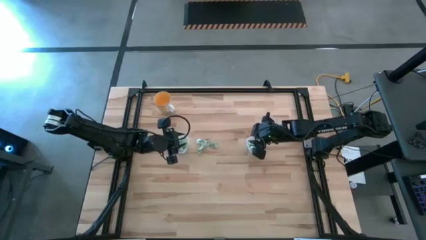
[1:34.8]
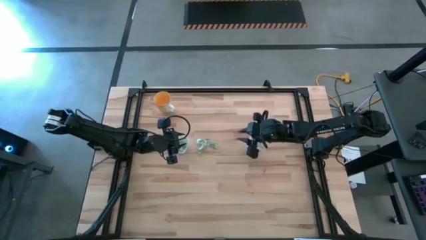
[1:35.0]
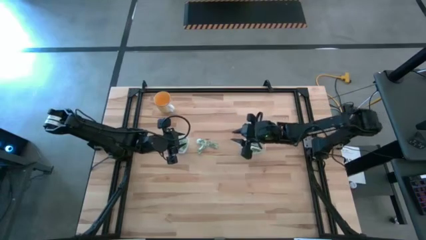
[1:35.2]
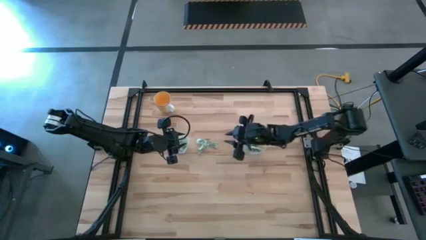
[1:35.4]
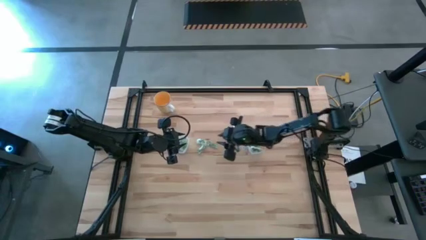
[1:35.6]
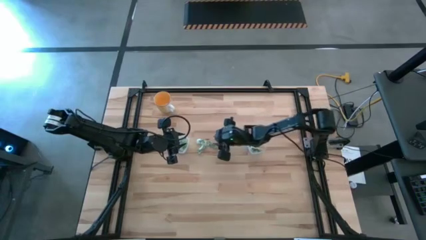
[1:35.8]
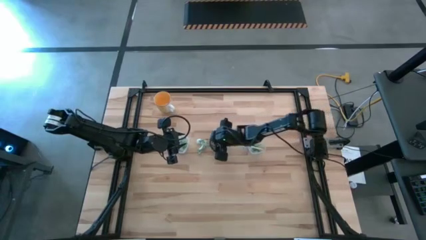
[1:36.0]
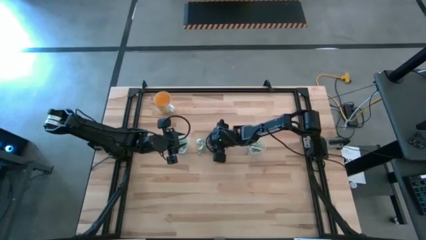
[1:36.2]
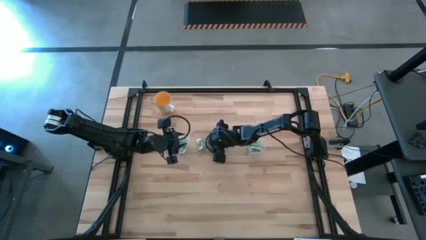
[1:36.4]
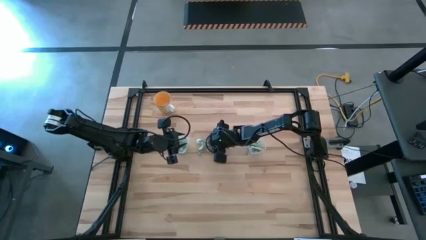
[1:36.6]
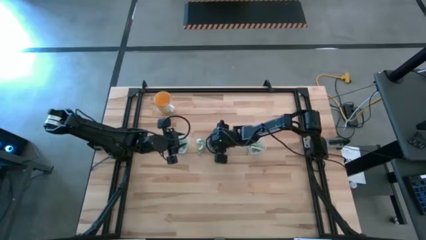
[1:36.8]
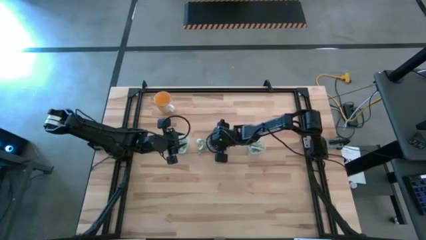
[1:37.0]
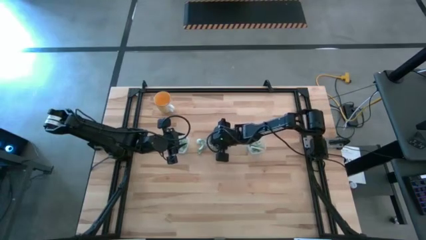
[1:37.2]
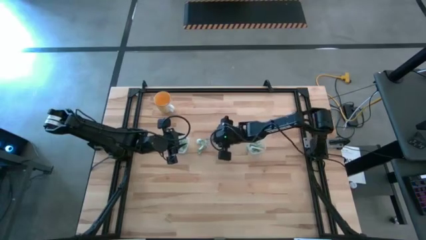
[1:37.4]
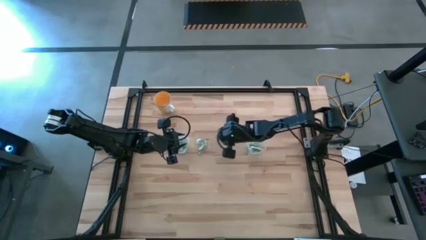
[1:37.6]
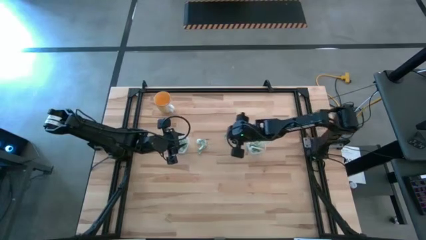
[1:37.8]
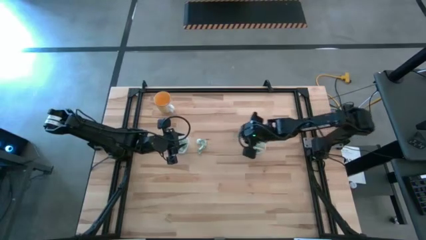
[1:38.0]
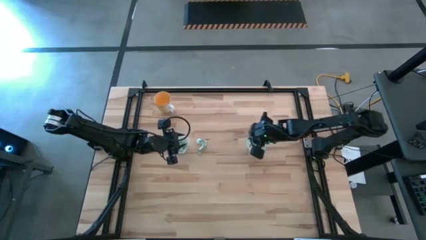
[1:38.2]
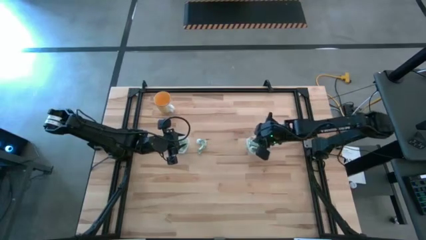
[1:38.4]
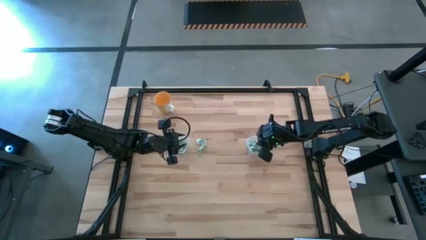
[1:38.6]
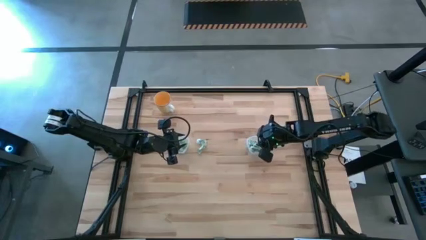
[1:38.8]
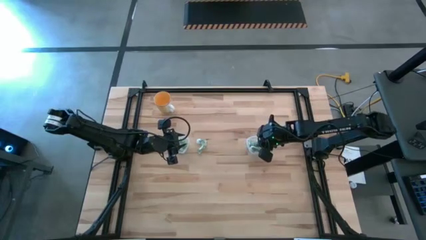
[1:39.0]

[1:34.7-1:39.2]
Task: Pick and place Stevia / Truvia into bins
Put the stevia packet into the right transparent container

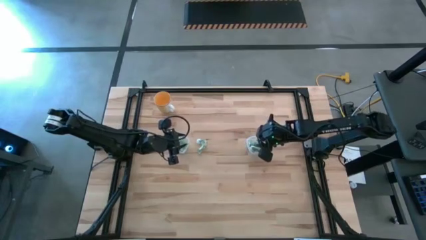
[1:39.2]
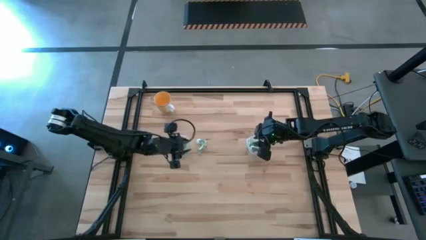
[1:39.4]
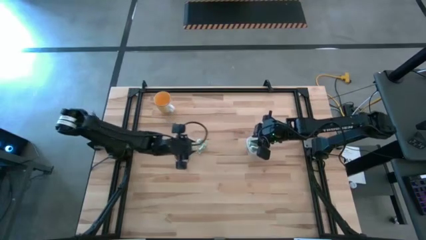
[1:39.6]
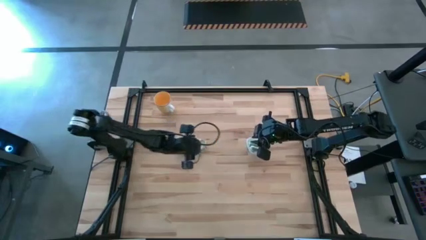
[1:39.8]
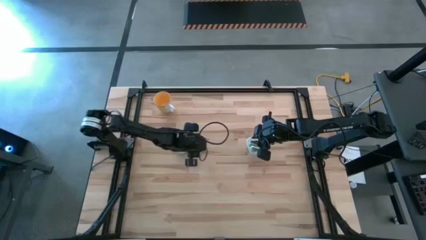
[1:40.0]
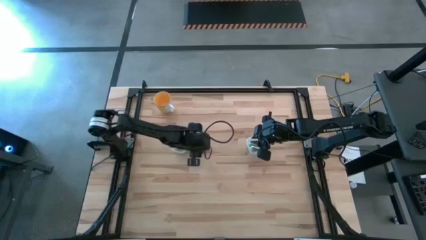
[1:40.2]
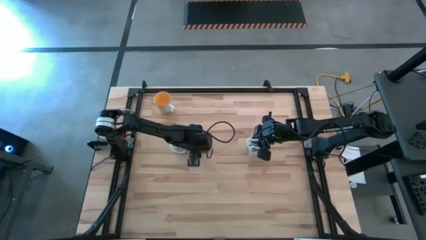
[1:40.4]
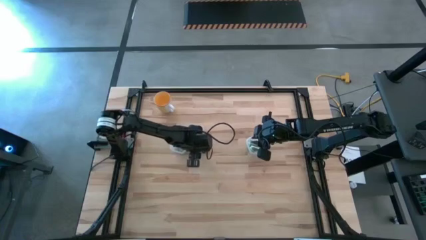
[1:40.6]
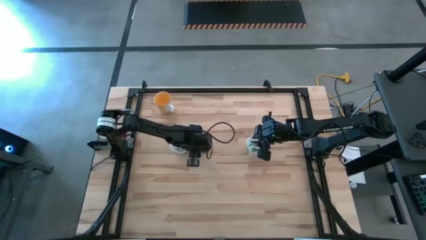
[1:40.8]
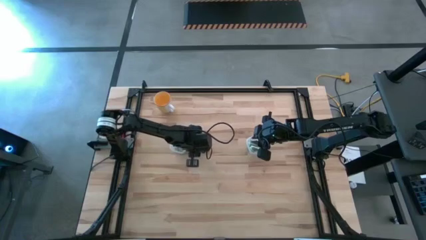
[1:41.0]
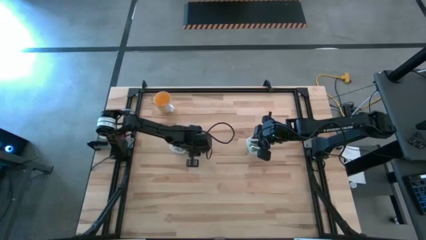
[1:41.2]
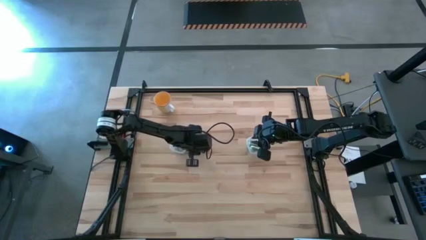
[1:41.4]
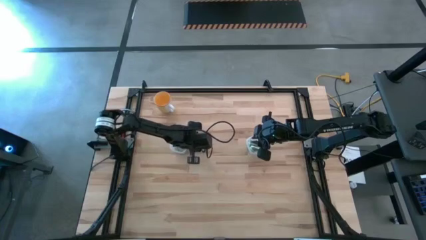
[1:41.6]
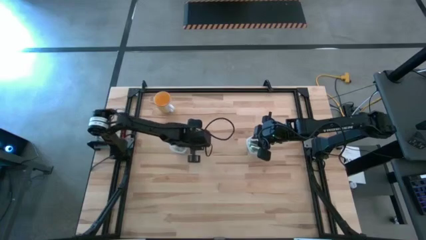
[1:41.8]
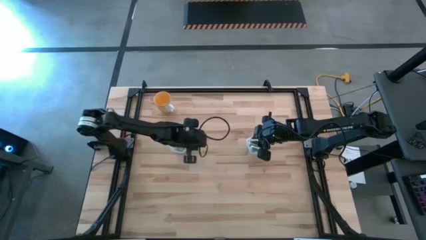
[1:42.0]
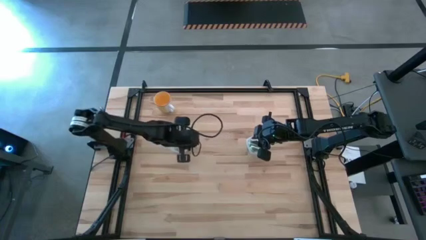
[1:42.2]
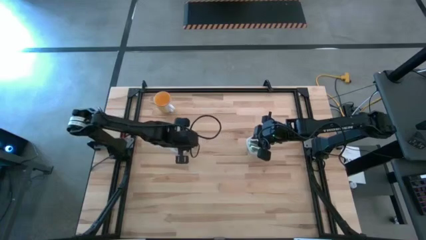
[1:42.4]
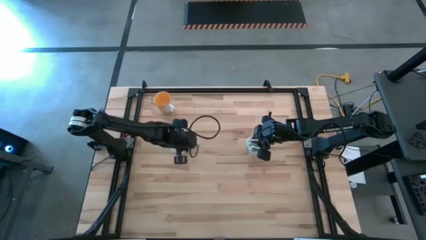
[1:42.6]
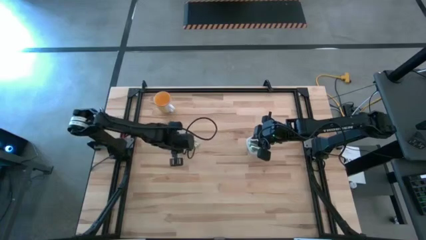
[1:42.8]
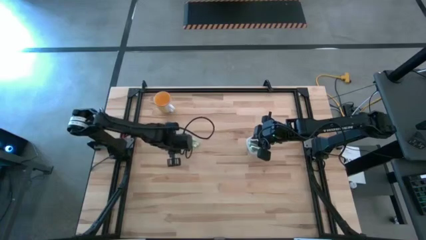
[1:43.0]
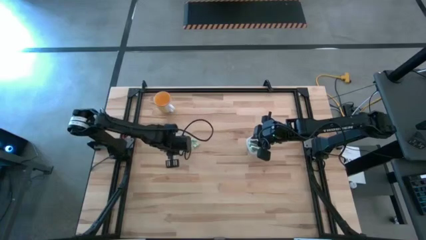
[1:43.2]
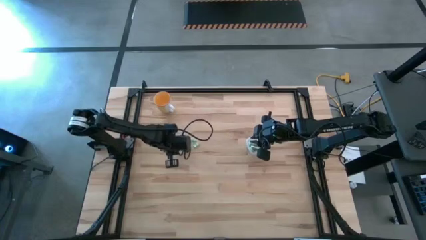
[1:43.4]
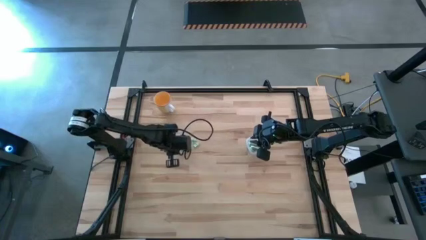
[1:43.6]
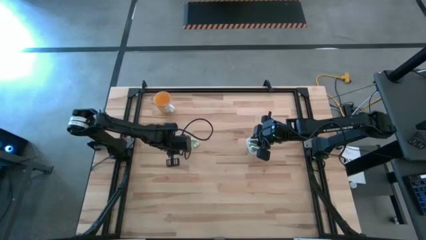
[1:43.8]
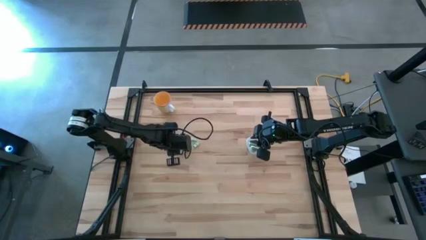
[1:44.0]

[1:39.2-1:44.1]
Put the stevia packet into the left transparent container

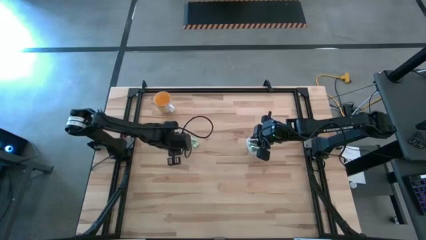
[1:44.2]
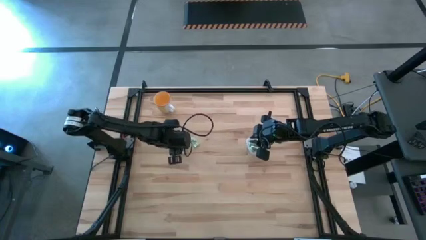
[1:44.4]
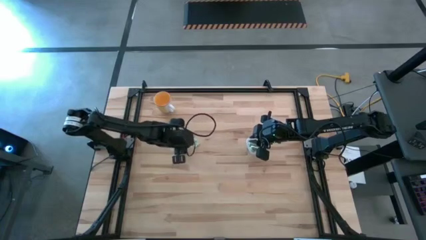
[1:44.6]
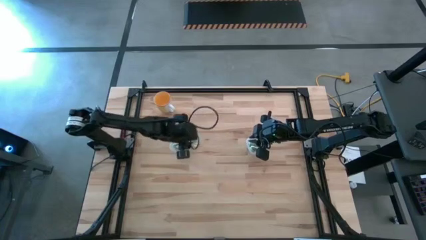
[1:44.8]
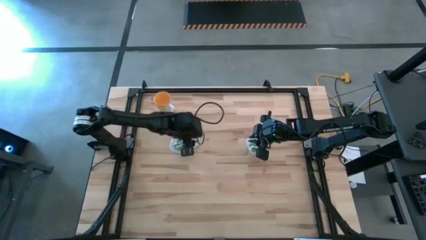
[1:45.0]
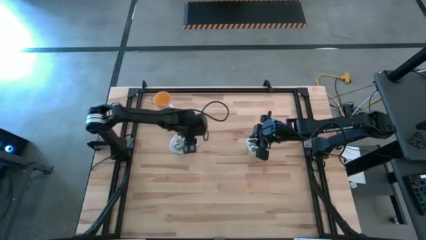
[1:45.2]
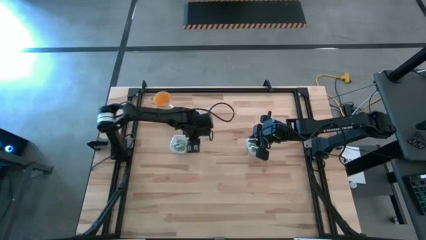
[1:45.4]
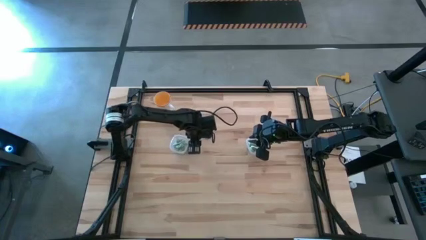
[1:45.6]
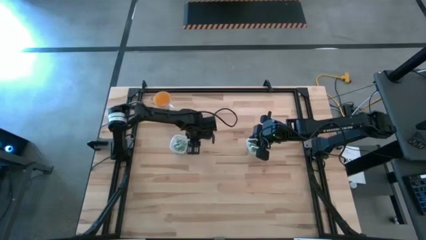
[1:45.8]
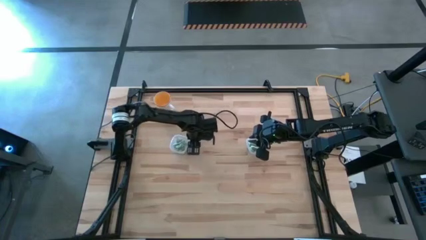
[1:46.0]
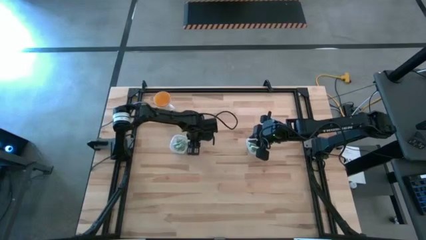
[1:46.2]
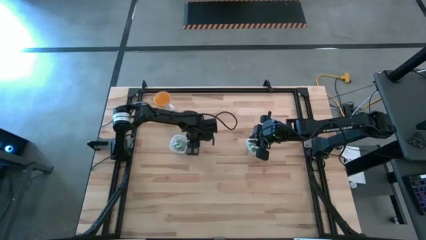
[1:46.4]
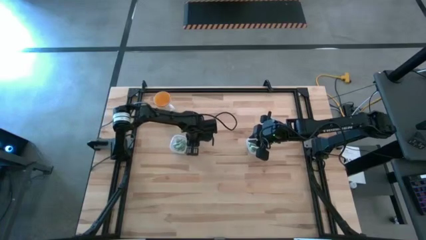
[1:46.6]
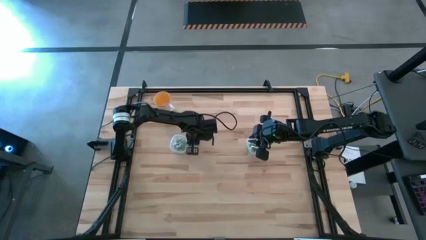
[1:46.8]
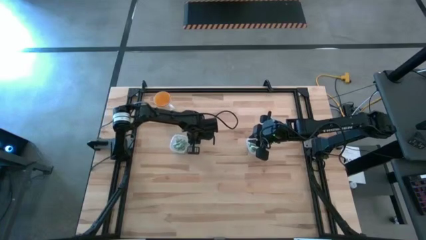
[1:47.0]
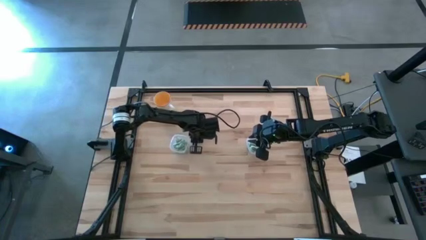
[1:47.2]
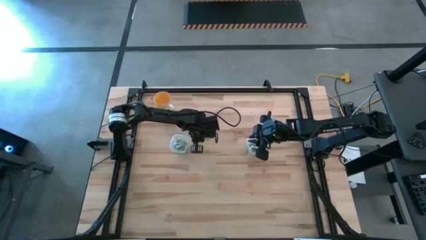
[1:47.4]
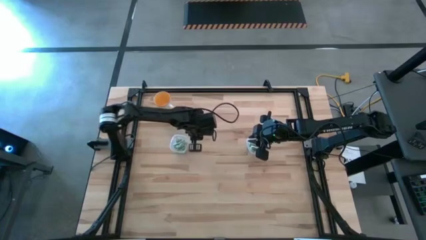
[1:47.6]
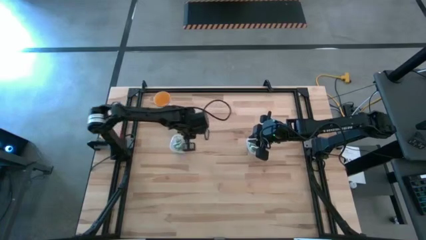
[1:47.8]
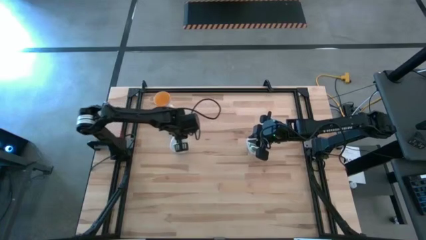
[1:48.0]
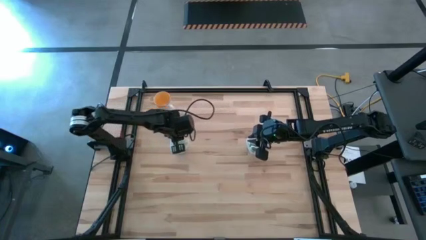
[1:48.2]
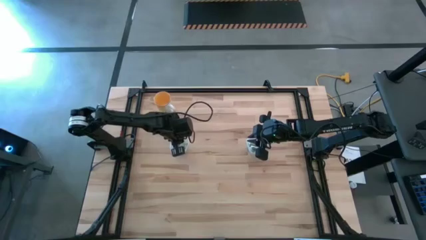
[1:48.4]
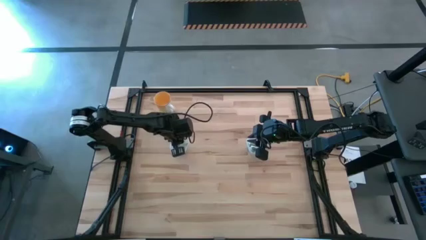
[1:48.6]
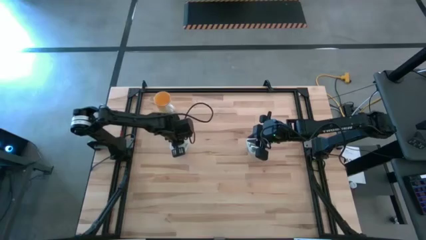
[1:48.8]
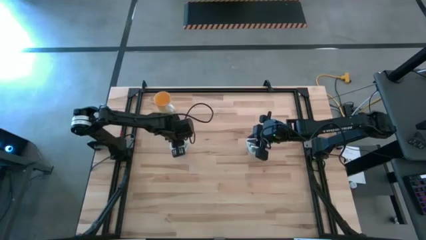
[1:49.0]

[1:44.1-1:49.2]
Put the stevia packet into the left transparent container

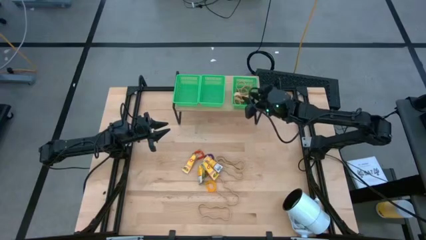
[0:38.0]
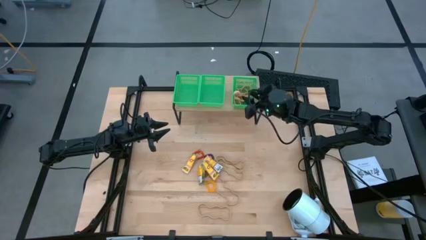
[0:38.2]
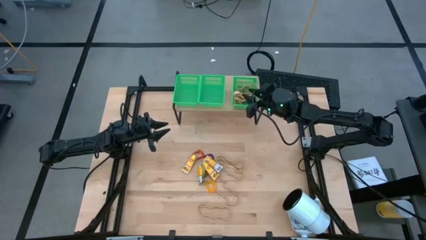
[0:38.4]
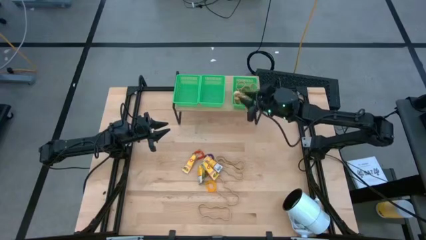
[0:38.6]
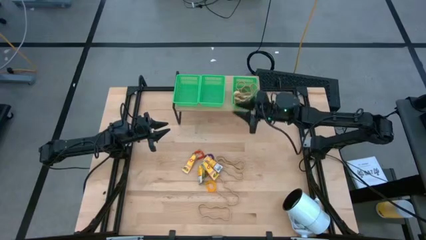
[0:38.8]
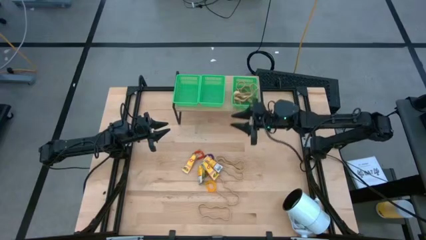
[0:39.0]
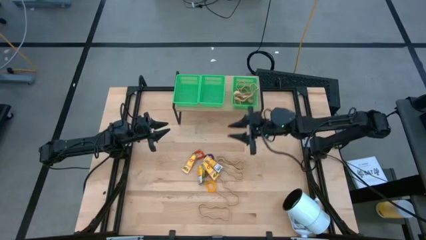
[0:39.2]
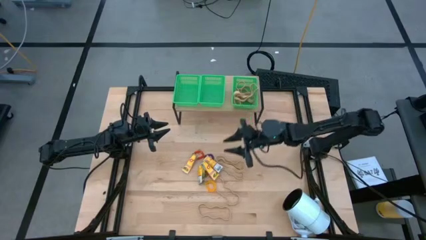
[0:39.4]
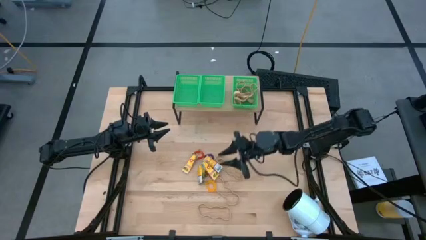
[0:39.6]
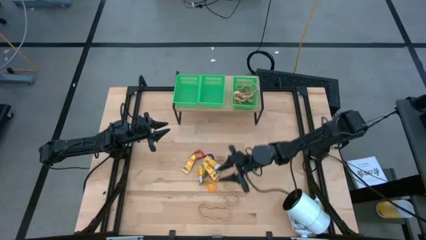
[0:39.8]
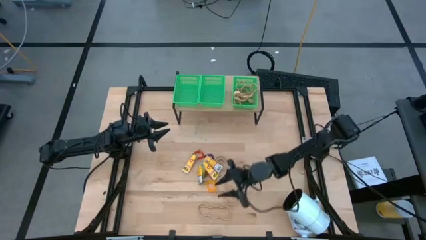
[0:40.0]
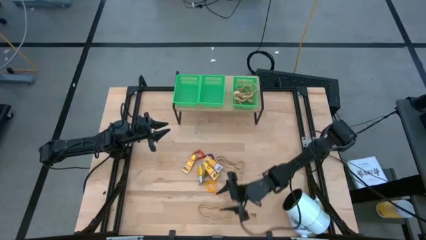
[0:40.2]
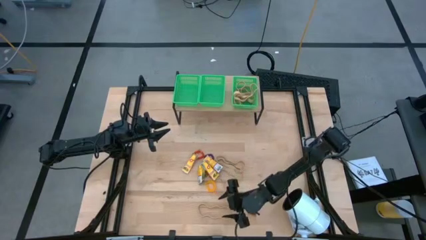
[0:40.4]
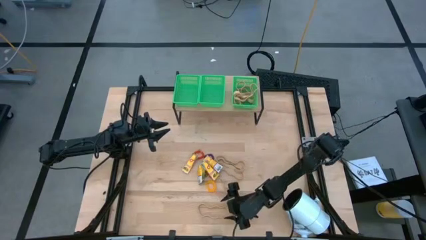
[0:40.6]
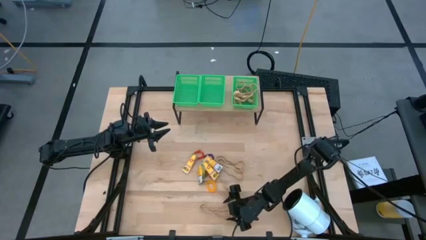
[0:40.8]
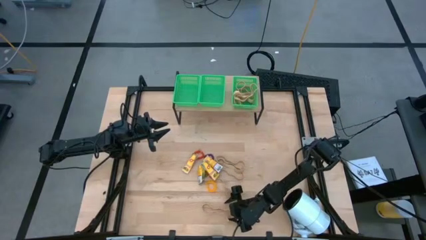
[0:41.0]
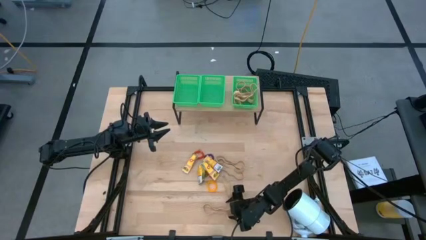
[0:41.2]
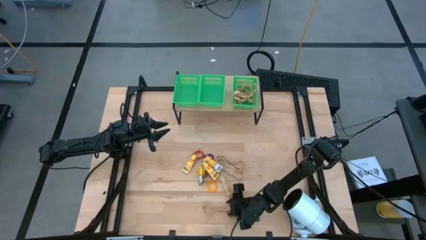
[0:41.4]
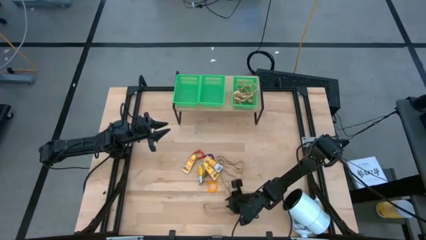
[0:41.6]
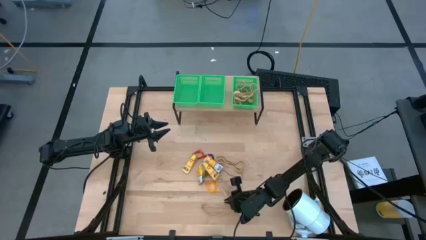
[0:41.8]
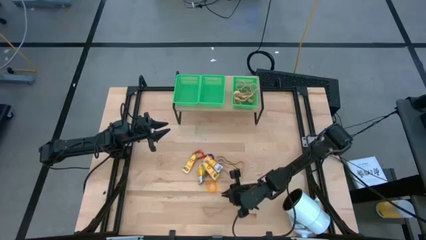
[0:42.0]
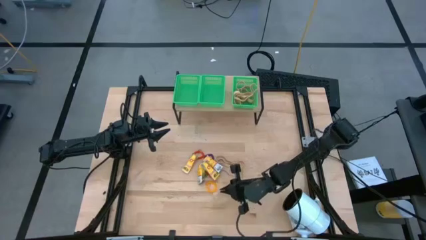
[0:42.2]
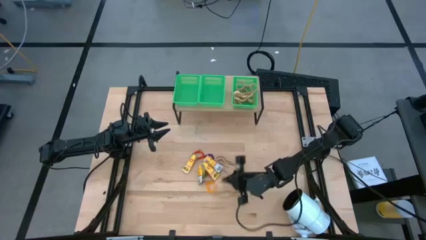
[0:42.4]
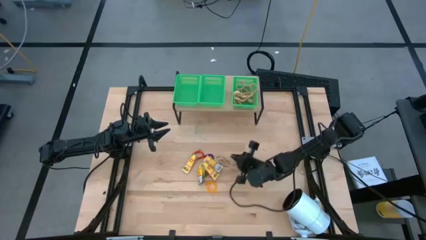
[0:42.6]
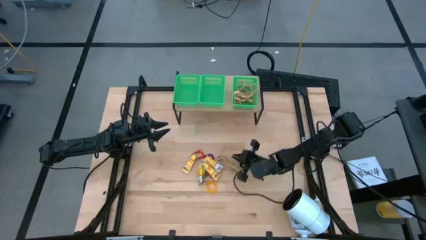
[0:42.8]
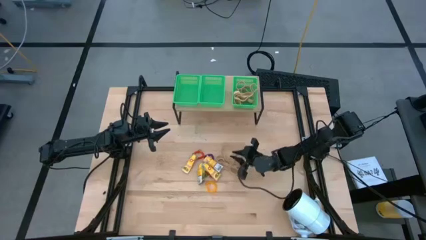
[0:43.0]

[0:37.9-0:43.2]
Task: Pick & Place Office Desk Supplies
Put the brown rubber band into the right green bin on the shelf
